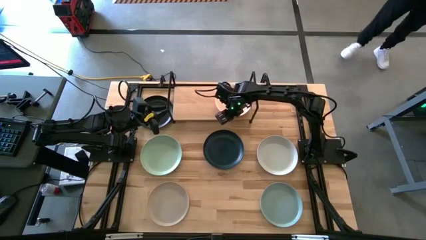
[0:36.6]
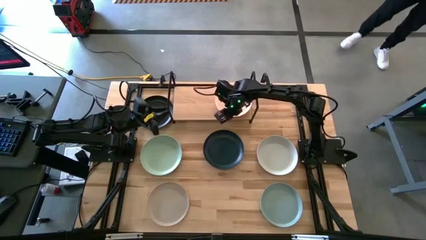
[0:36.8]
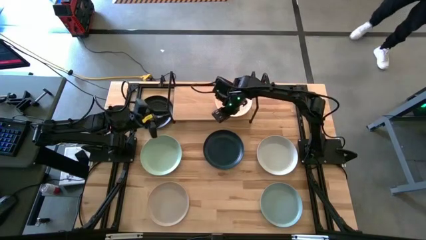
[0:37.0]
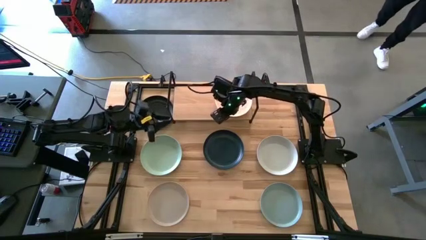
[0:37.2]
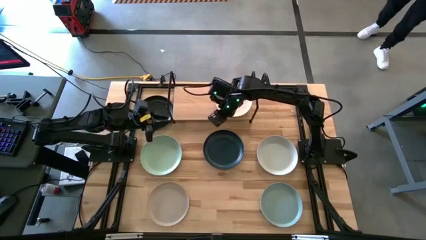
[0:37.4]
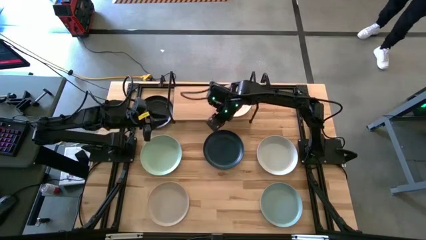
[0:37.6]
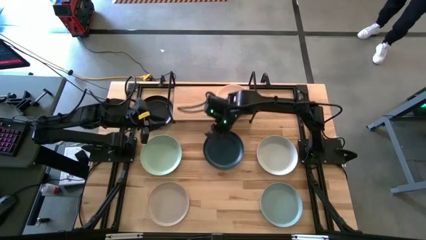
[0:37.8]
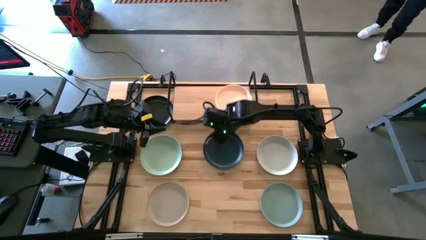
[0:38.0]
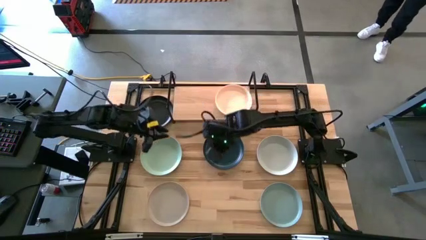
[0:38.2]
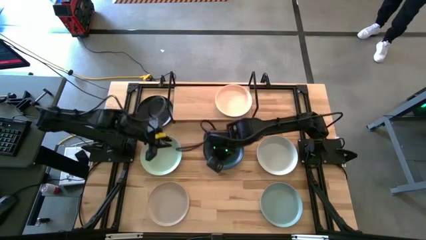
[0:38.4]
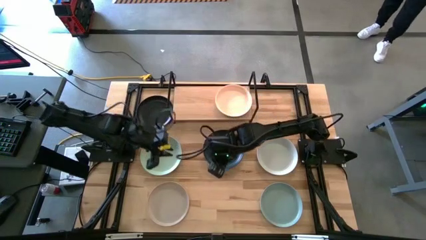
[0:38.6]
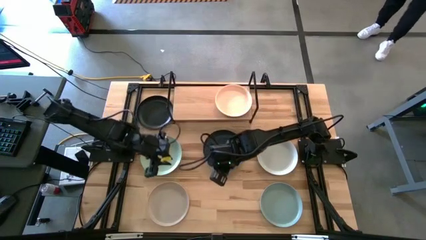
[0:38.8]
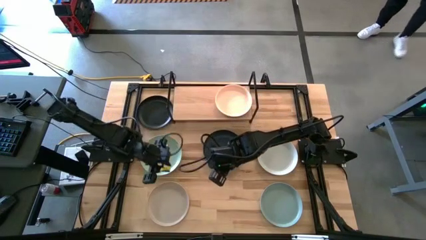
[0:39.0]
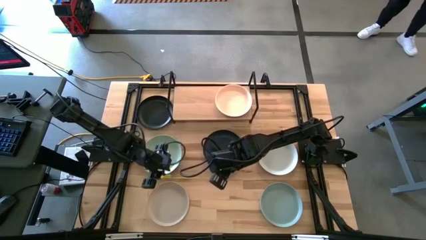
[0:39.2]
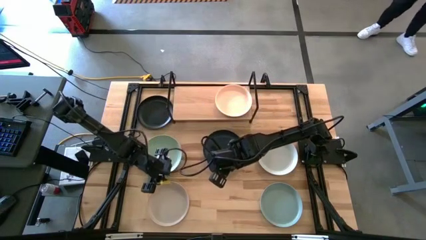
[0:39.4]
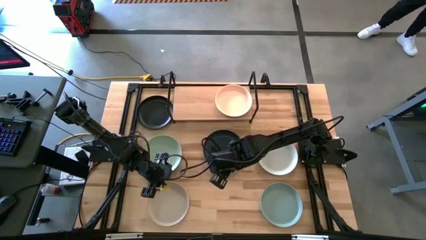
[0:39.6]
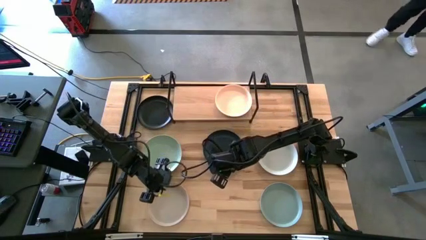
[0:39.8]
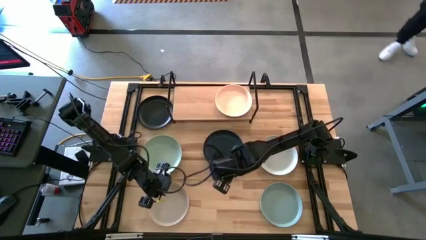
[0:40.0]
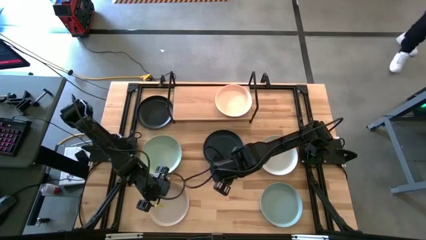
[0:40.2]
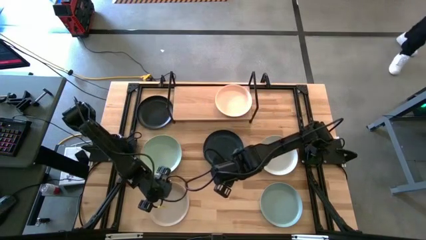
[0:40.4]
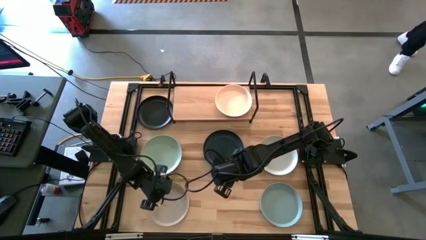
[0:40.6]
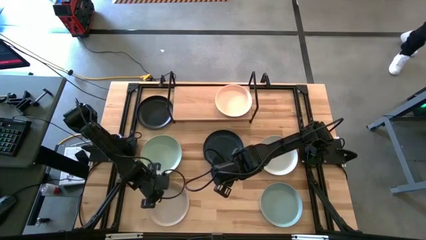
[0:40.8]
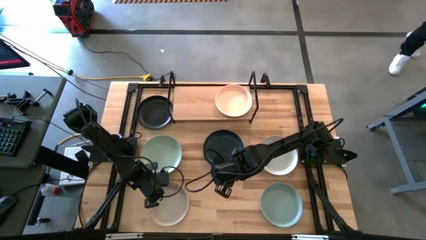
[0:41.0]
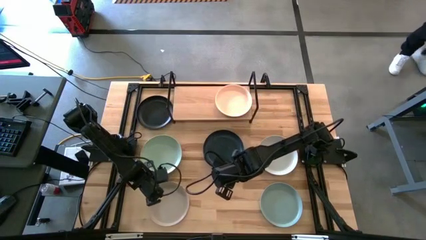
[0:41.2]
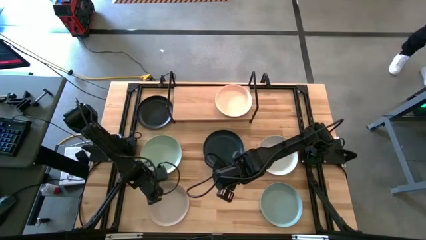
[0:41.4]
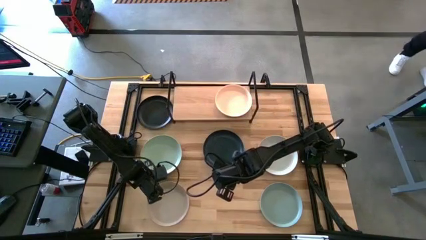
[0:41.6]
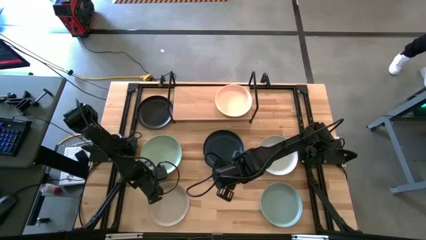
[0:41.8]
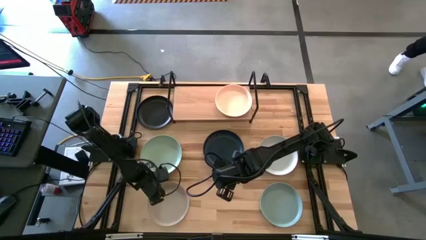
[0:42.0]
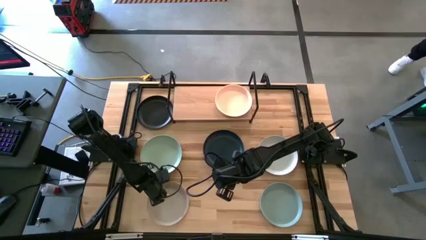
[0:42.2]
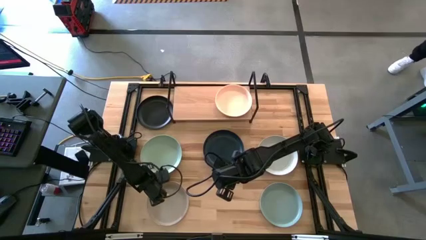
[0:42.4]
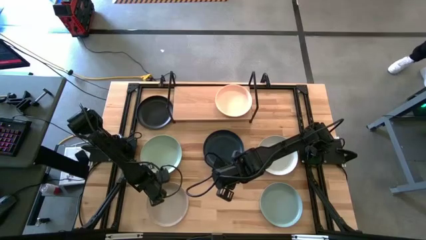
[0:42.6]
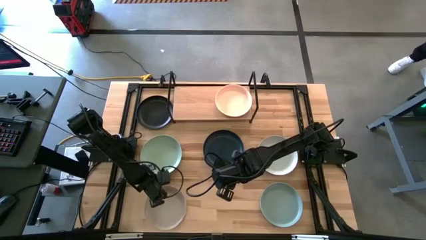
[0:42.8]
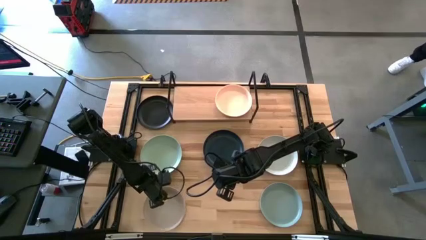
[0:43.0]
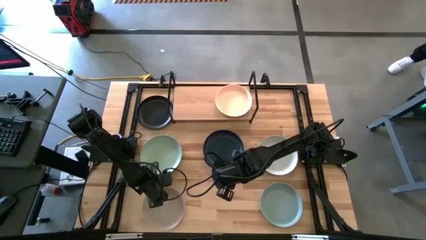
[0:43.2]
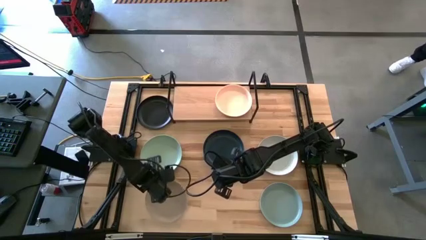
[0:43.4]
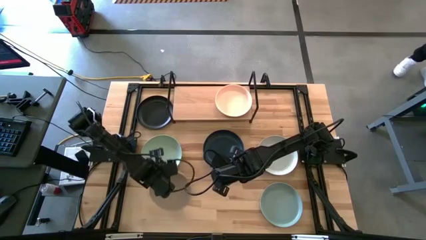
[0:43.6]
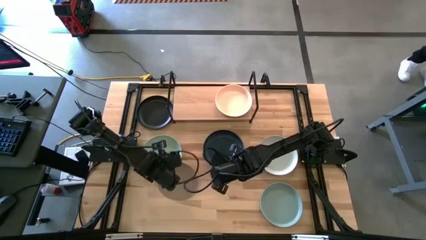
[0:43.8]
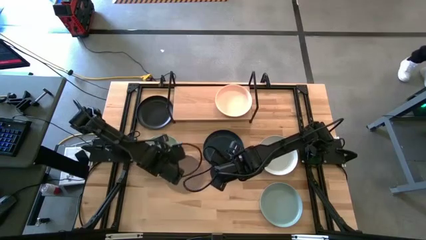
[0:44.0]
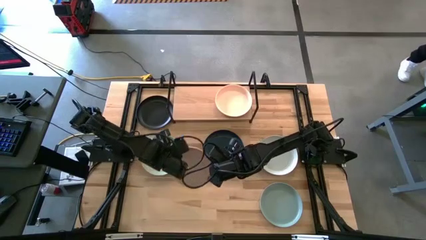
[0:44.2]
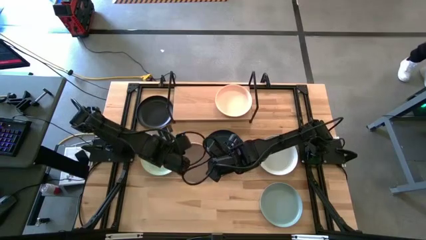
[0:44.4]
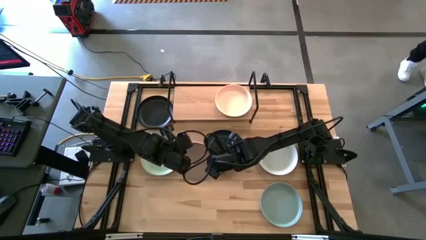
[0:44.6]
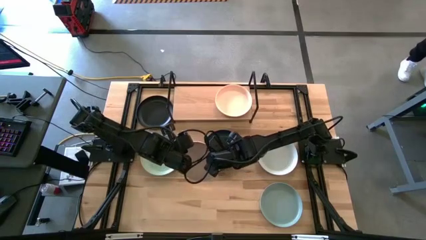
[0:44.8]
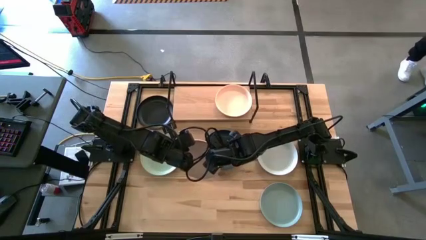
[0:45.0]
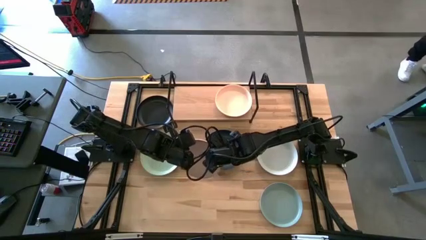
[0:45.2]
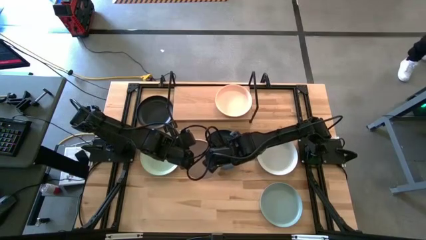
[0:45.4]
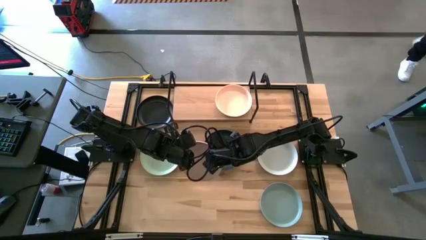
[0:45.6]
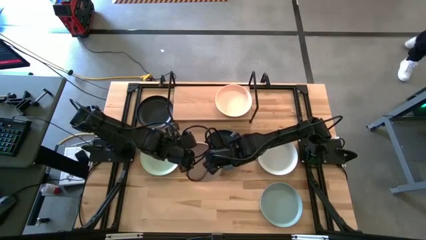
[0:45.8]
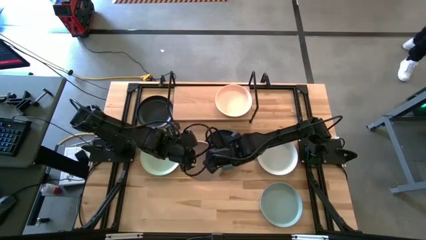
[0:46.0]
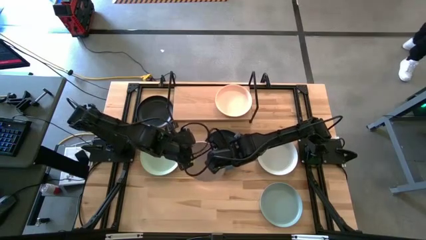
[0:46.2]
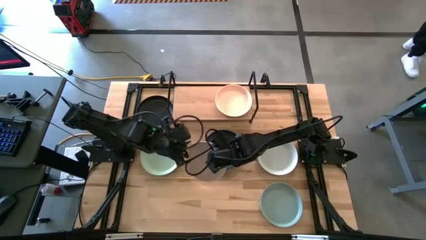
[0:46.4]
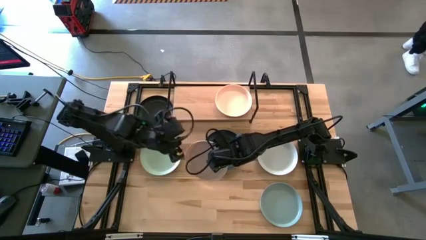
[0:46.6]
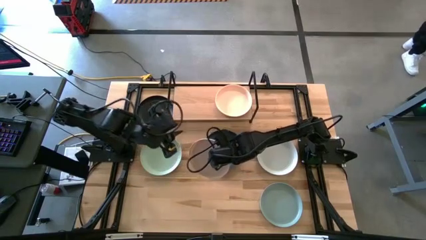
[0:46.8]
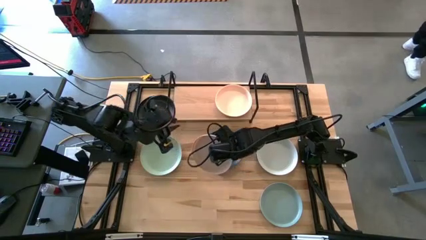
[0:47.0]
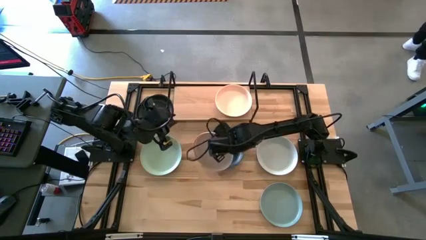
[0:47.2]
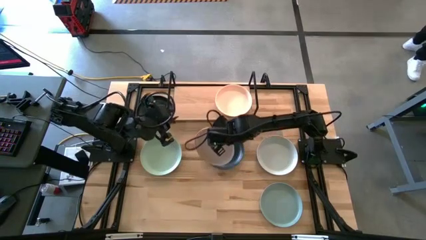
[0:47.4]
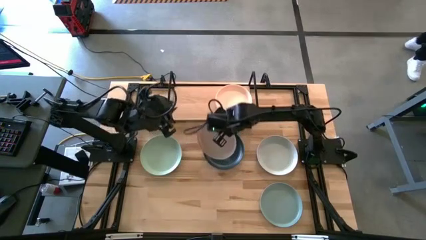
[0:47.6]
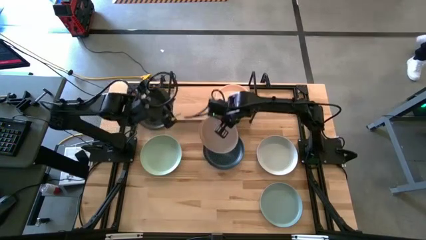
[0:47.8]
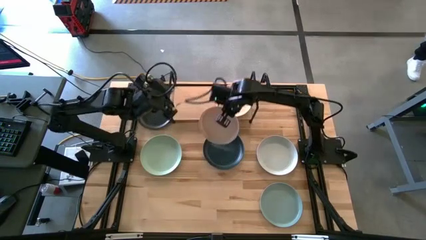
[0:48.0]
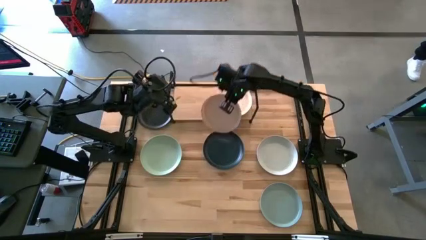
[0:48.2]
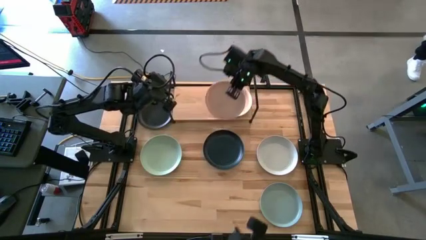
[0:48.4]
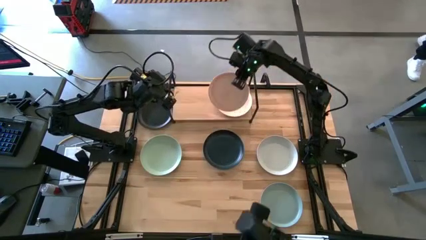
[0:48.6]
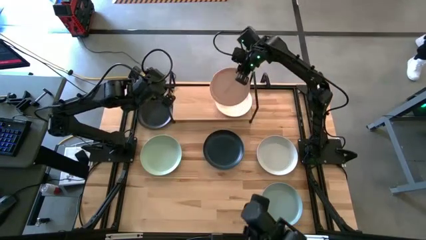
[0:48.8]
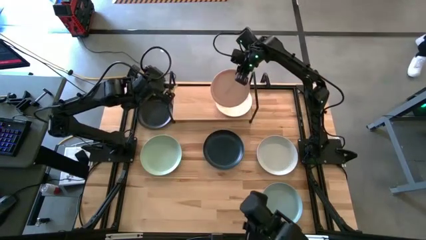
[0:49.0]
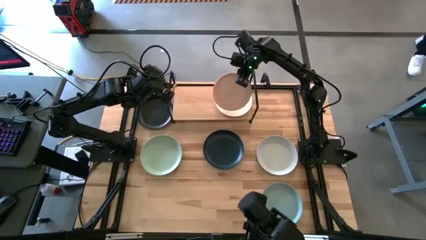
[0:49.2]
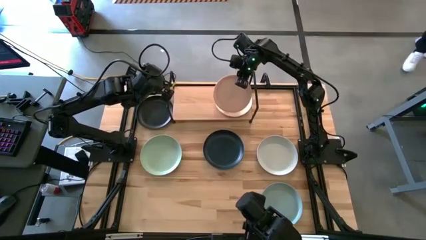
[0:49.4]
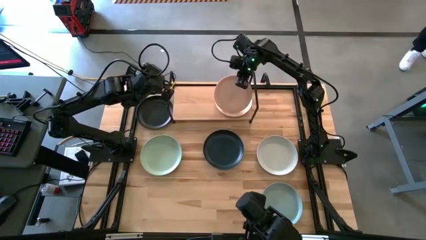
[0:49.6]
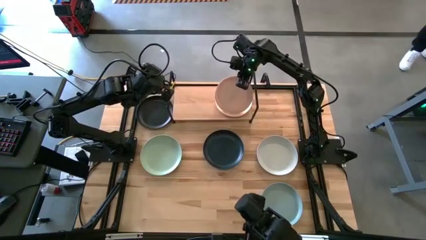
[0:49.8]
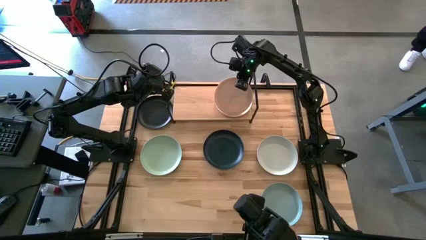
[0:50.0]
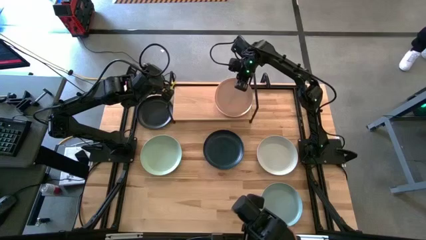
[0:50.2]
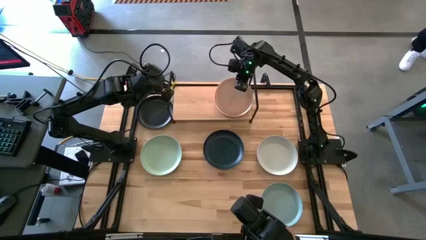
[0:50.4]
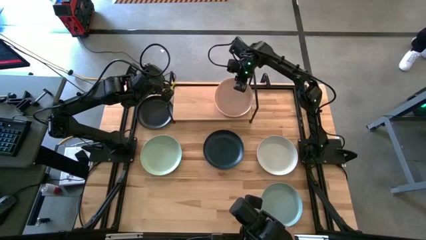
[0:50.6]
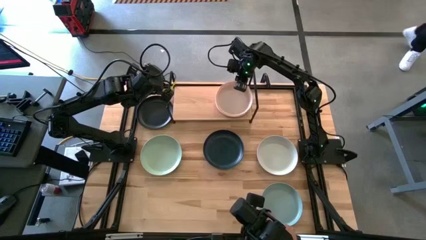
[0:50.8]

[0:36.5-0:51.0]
Task: Place and stack plates onto a shelf
Stack the gray plate on top of the light brown plate on the shelf

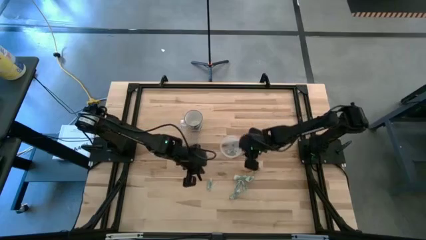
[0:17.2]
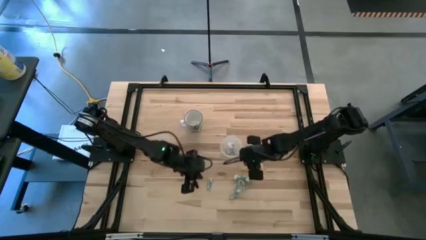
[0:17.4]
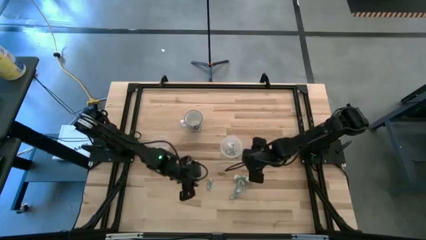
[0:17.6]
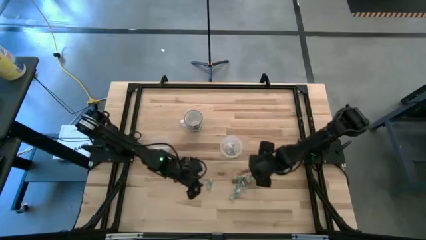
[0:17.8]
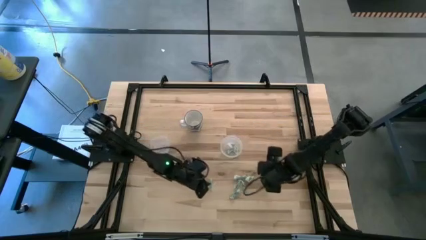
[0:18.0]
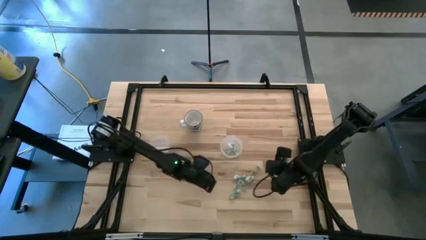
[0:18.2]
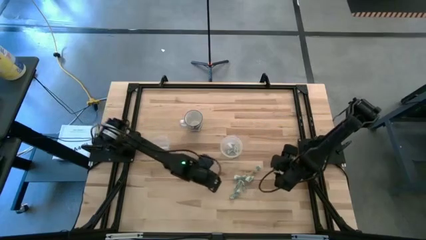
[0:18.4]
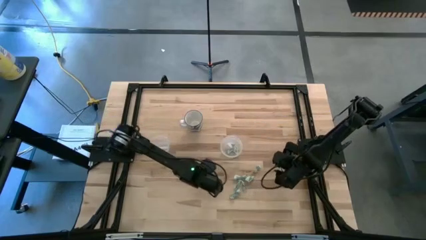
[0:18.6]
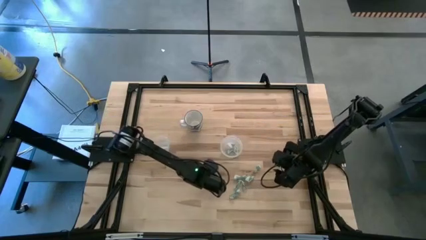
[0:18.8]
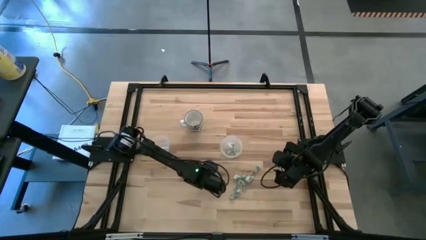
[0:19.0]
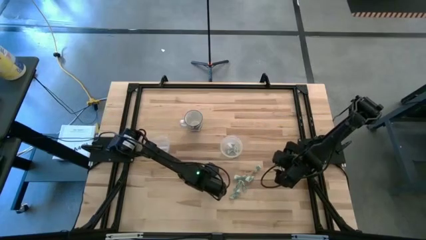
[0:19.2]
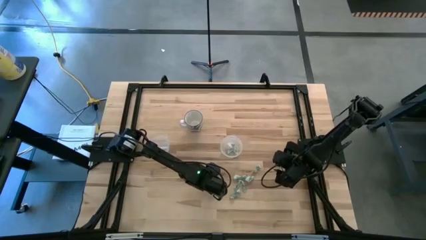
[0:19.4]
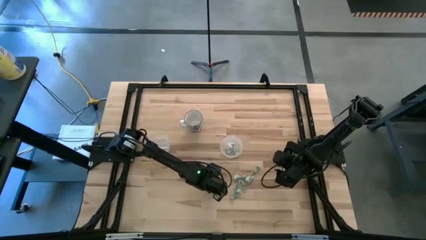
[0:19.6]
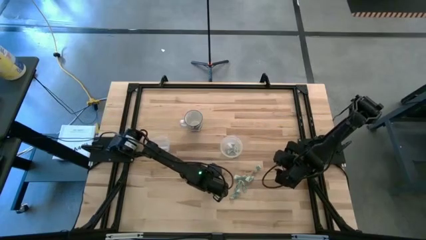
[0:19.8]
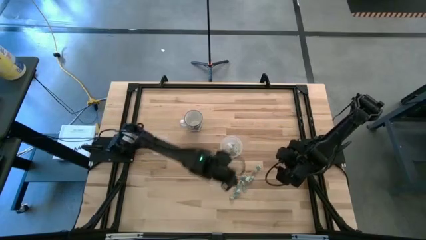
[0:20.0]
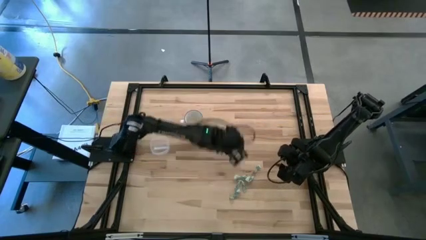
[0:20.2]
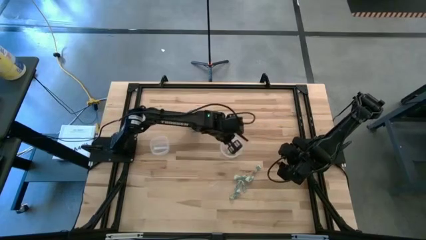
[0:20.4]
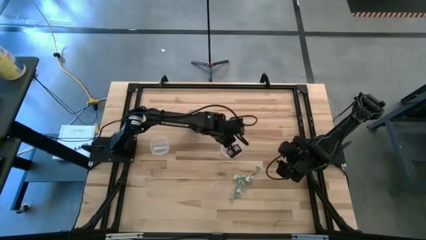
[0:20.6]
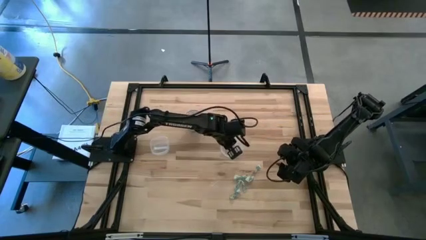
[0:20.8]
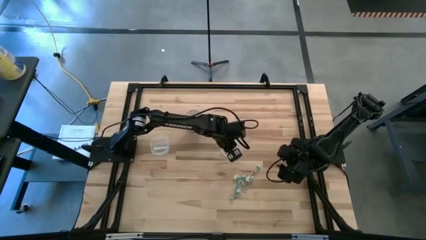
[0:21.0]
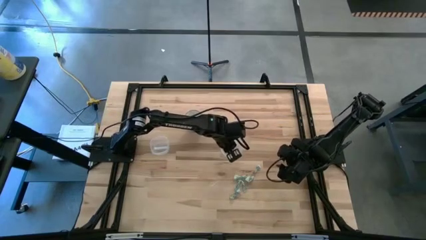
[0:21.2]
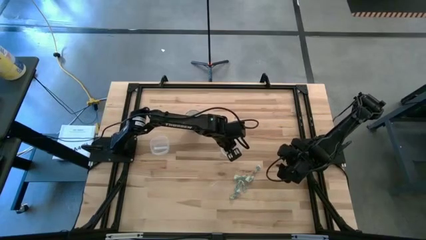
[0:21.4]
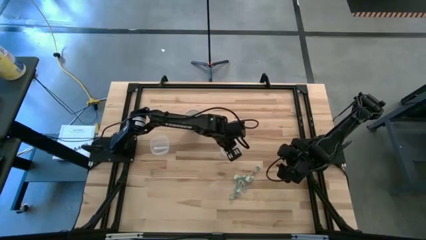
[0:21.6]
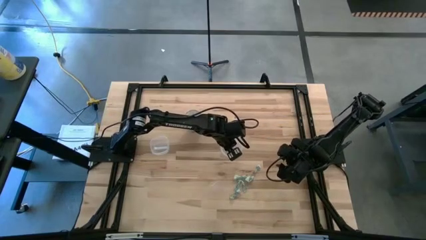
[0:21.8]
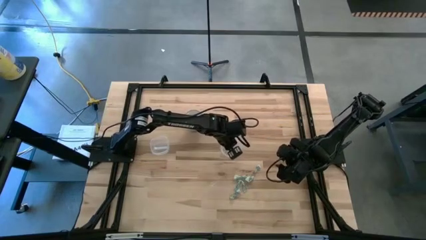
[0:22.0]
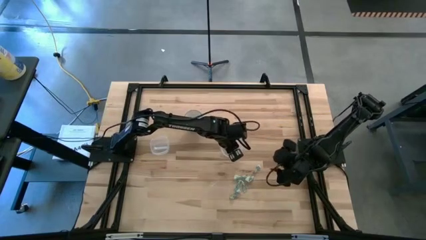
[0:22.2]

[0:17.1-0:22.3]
Task: Pick and place Stevia / Truvia into bins
Put the green stevia packet into the right transparent container
